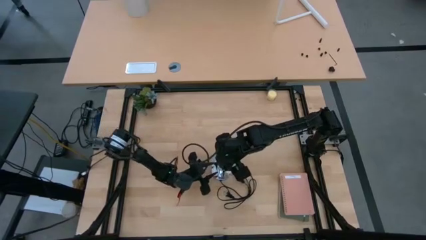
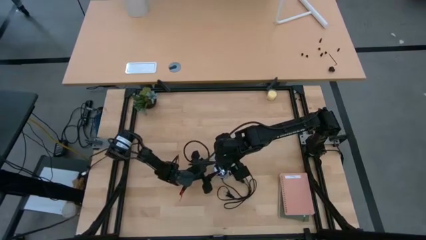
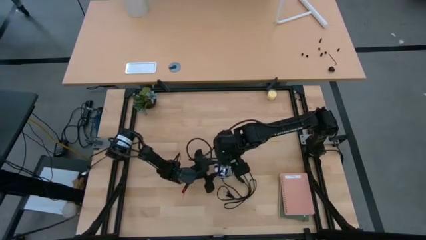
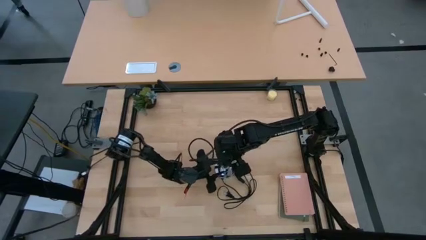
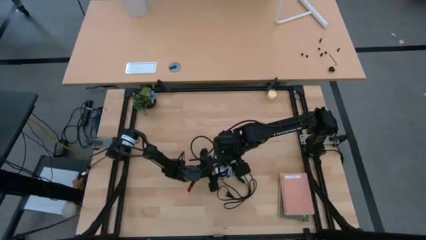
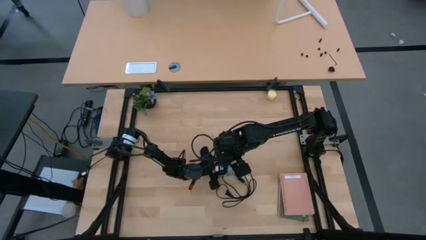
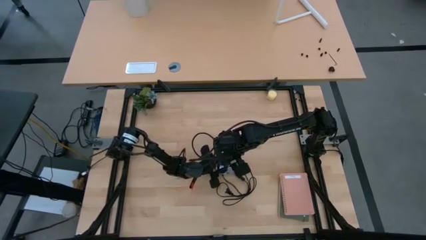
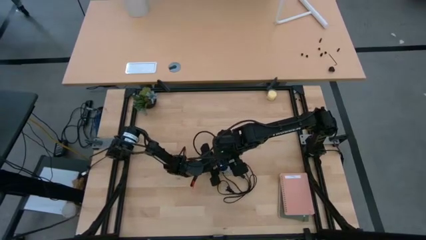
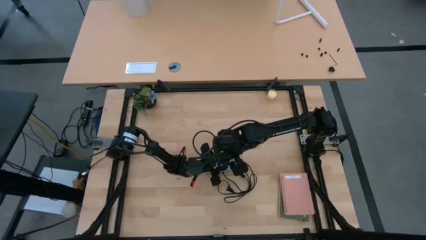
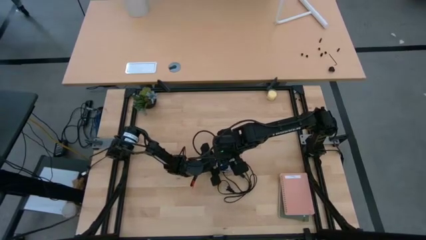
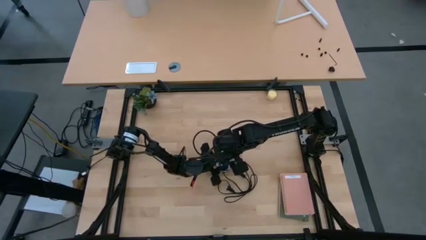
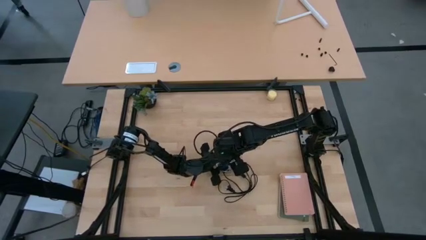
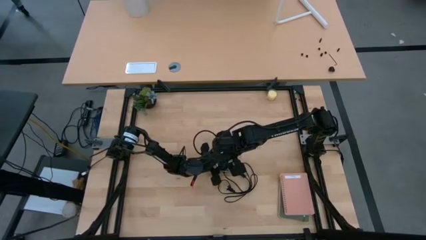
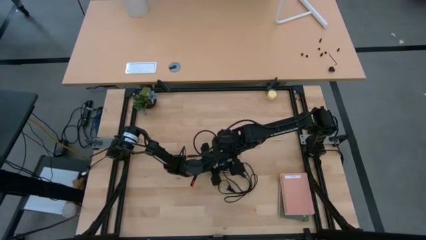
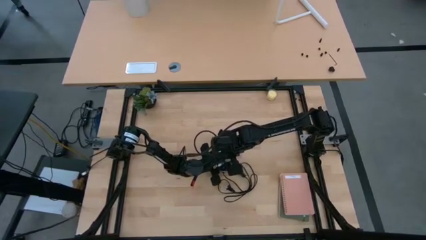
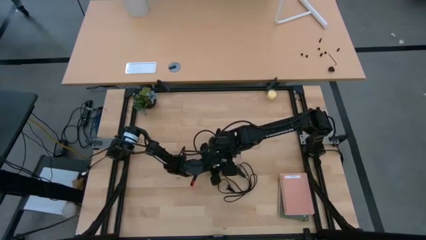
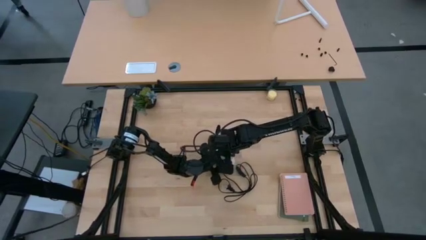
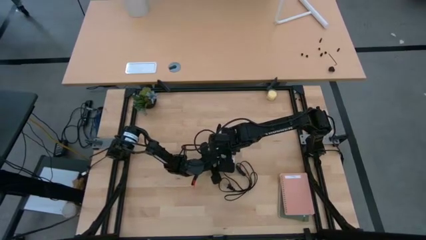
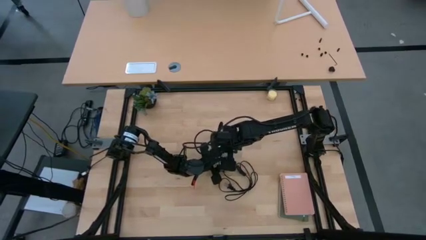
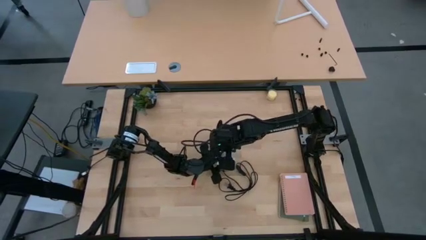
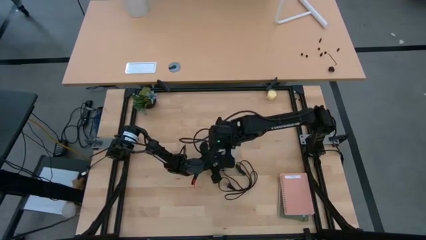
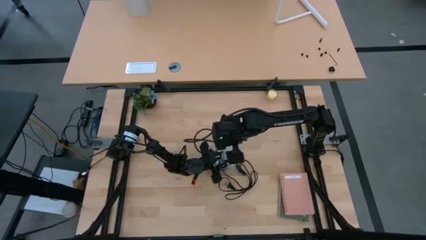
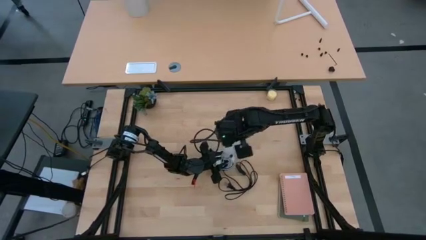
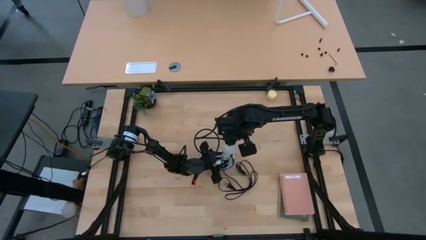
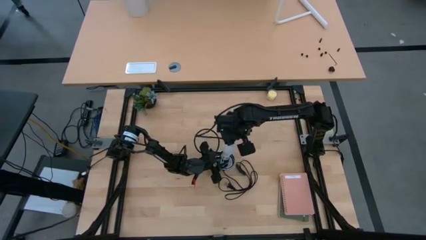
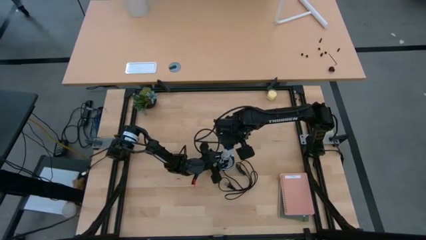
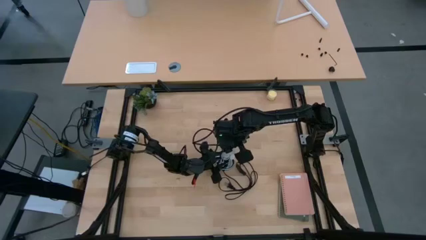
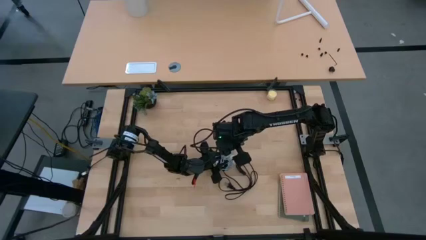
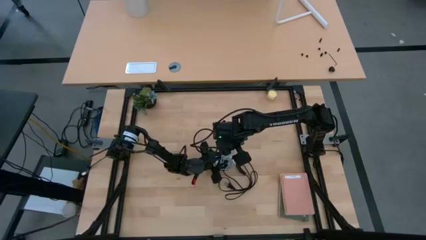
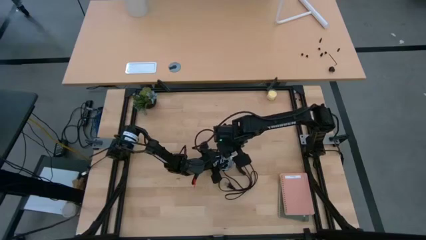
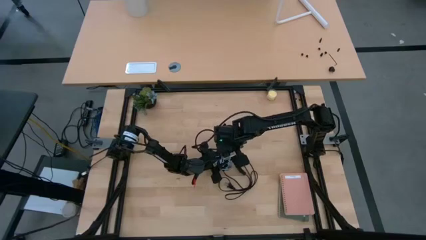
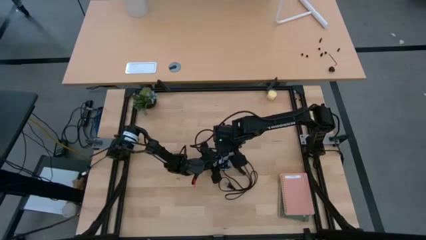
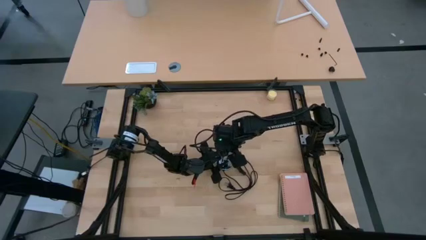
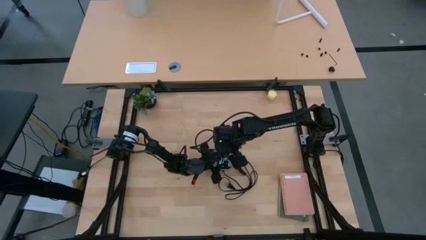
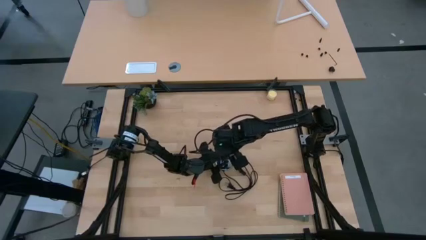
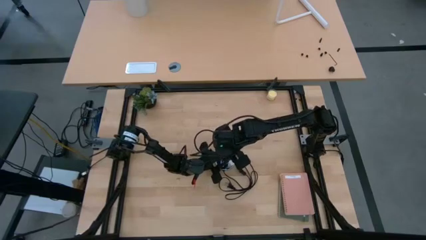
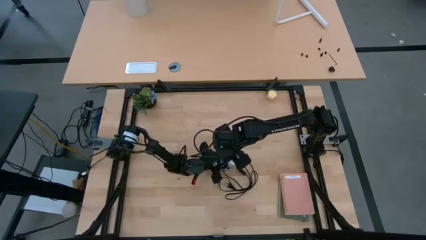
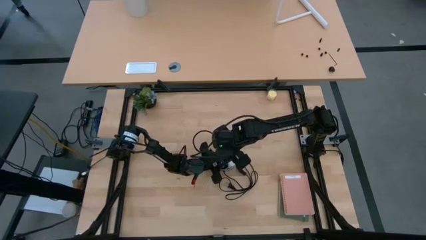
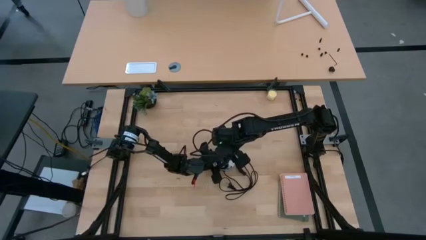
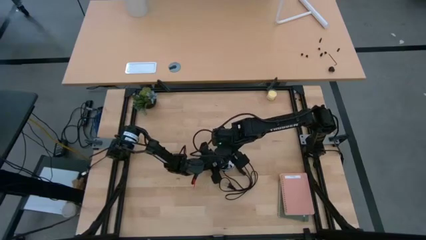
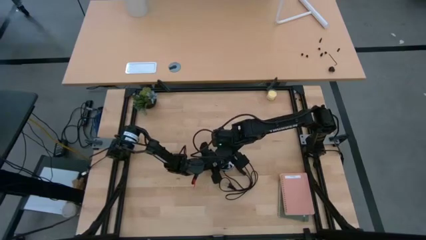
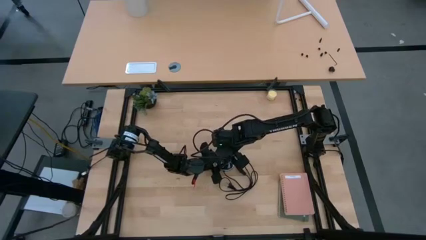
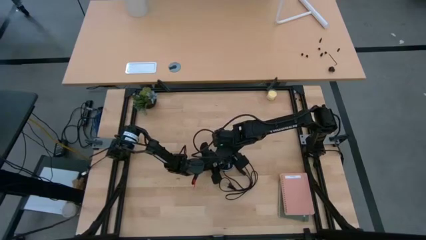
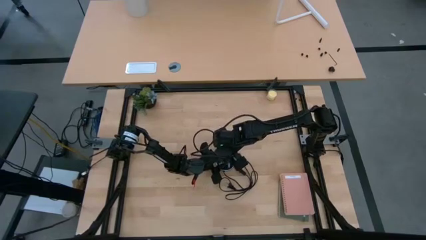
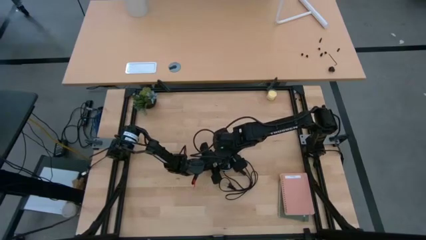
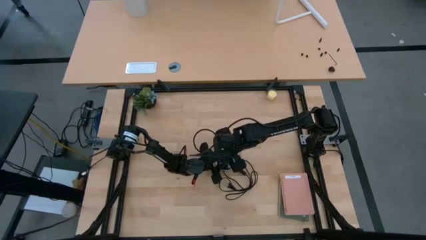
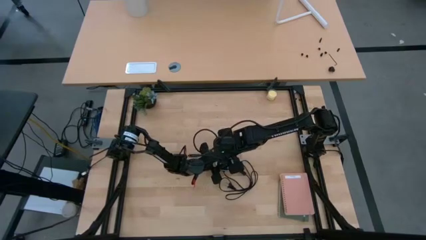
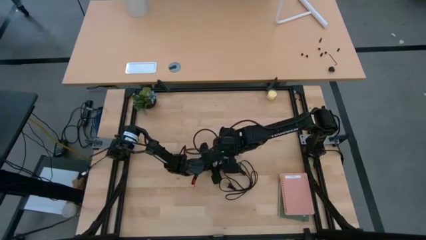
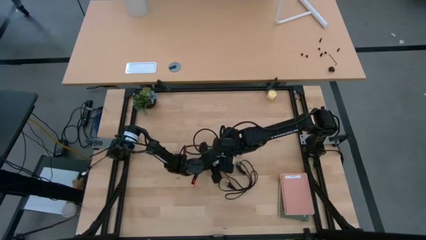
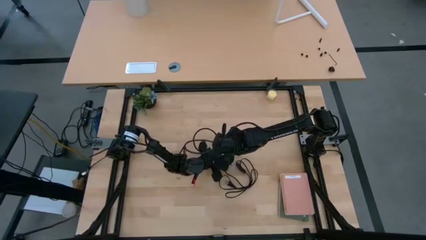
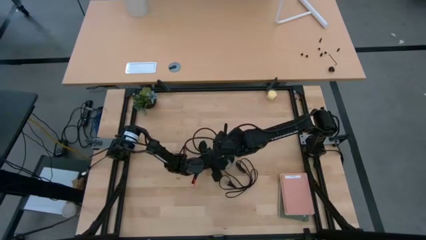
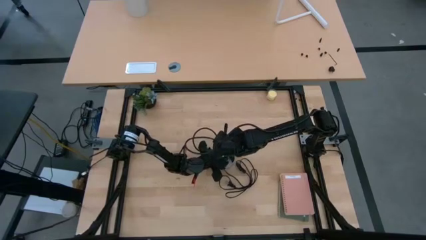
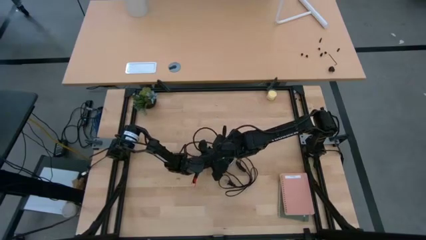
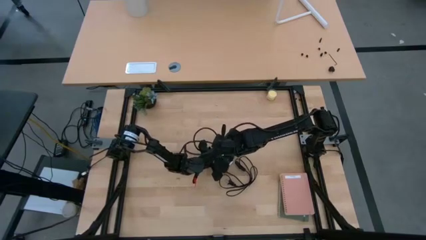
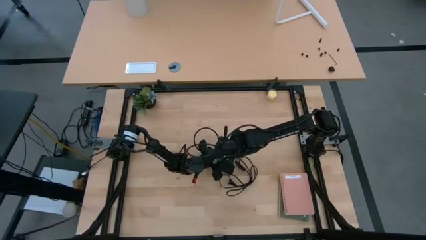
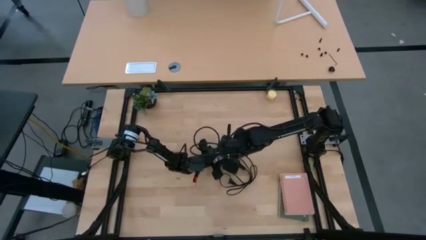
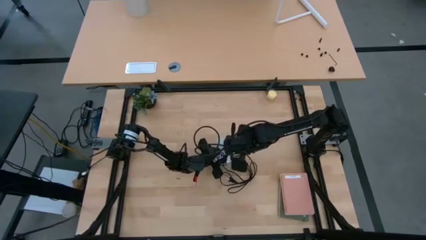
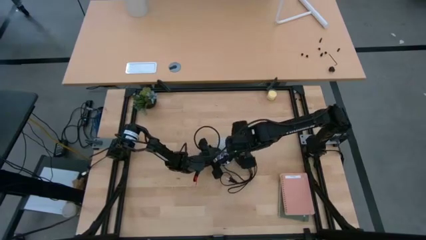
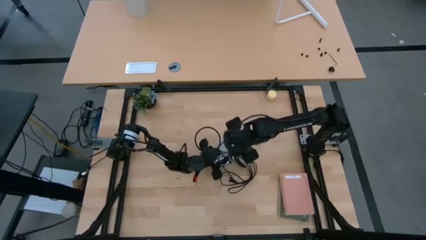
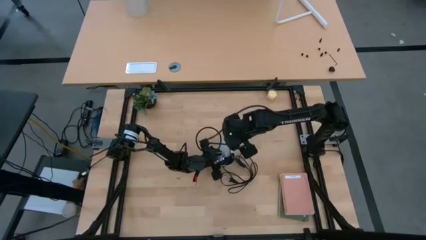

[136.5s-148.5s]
Task: Screw lightbulb
Insert the lightbulb into the lamp

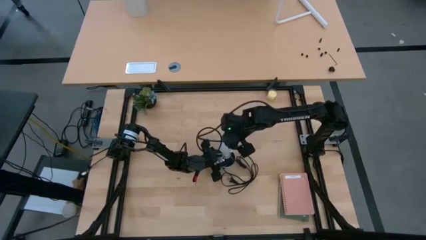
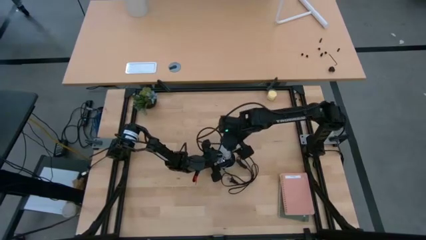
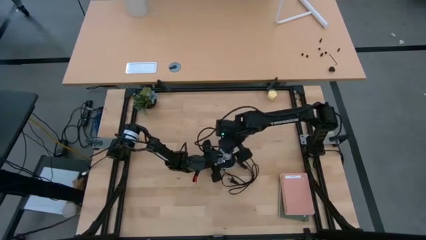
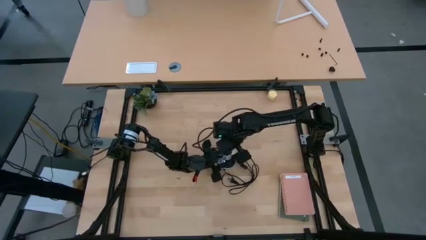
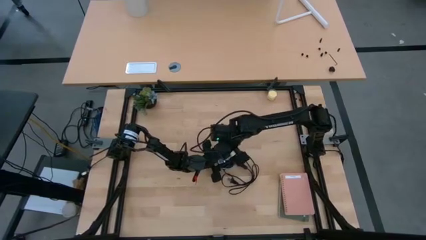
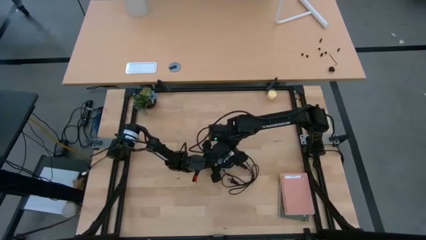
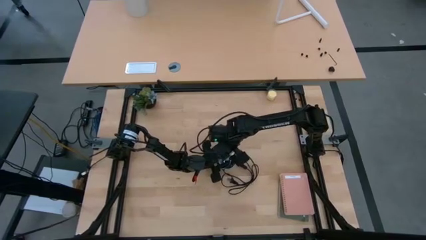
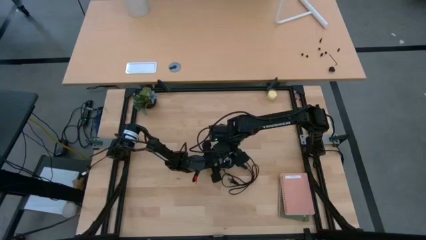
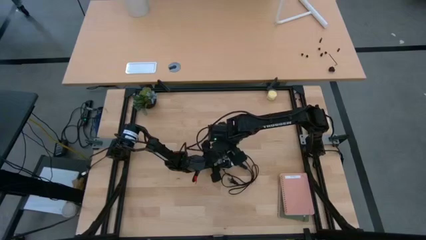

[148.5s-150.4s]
Insert the lightbulb into the lamp
